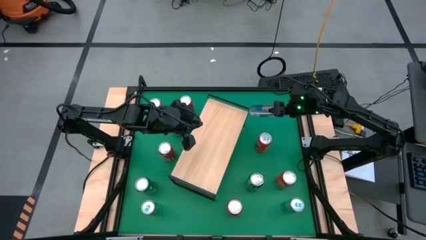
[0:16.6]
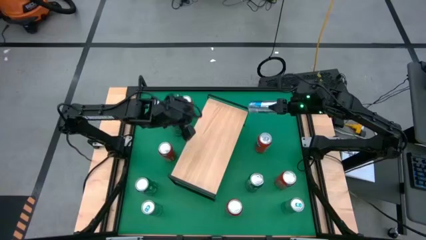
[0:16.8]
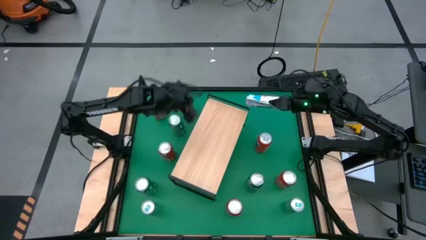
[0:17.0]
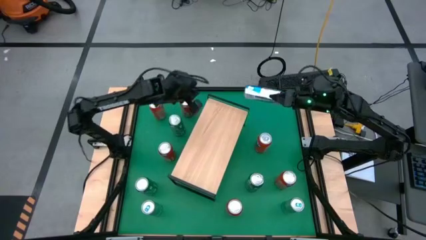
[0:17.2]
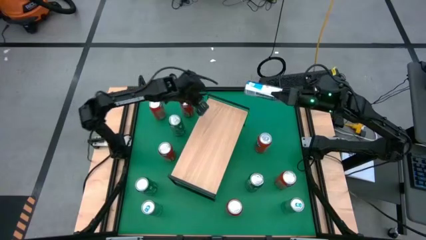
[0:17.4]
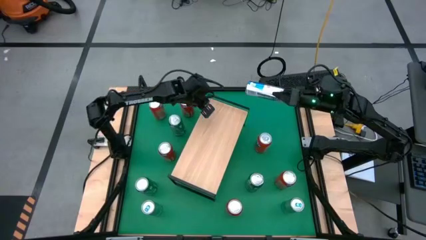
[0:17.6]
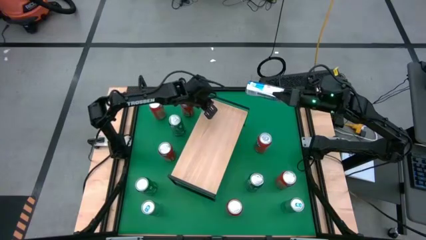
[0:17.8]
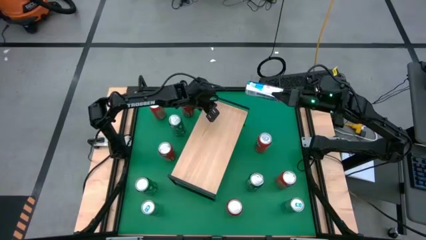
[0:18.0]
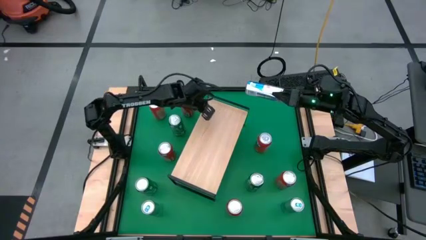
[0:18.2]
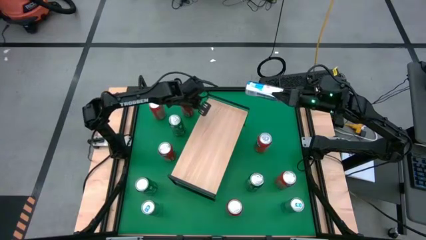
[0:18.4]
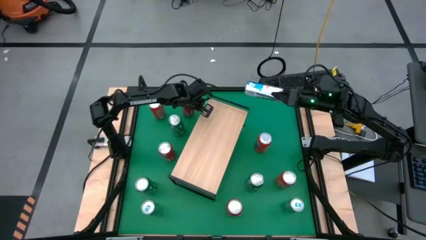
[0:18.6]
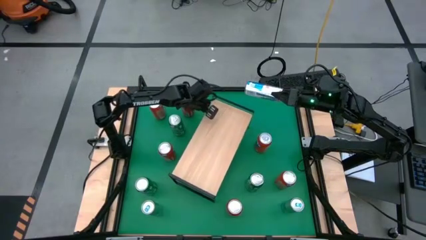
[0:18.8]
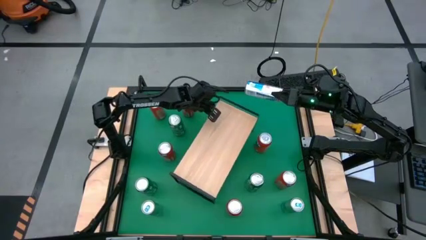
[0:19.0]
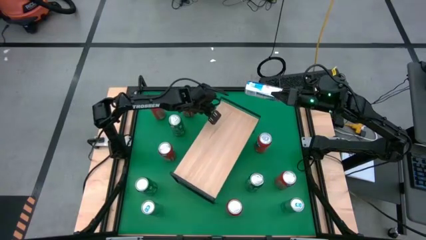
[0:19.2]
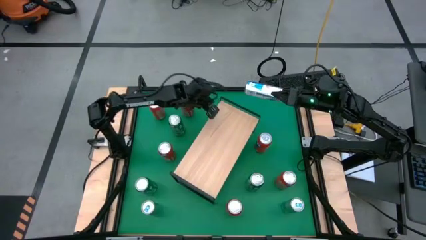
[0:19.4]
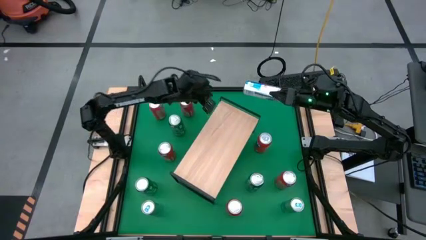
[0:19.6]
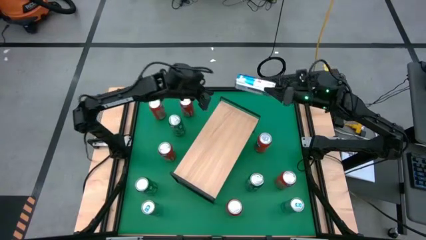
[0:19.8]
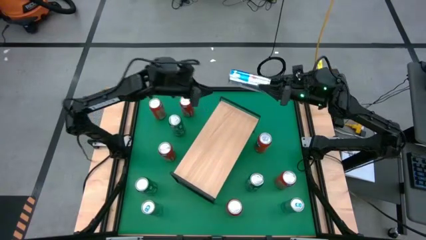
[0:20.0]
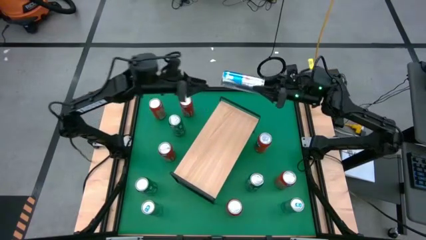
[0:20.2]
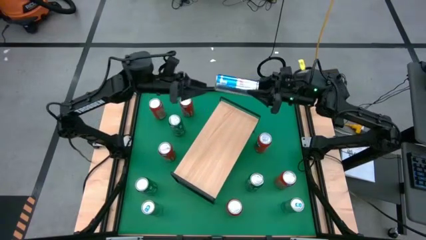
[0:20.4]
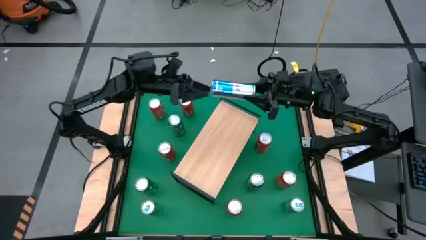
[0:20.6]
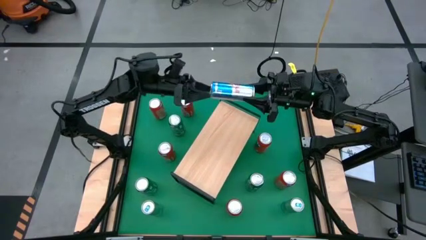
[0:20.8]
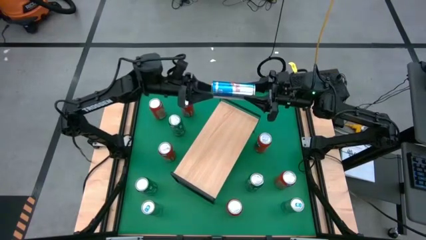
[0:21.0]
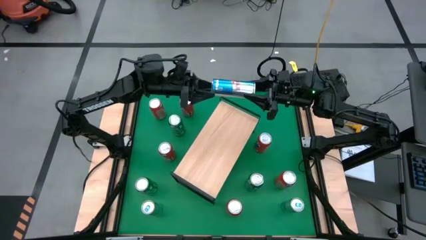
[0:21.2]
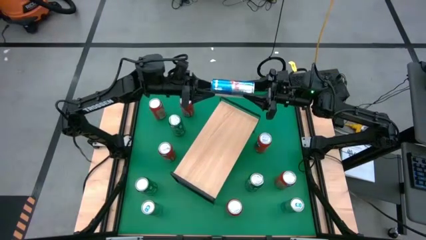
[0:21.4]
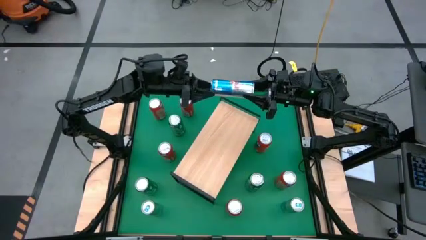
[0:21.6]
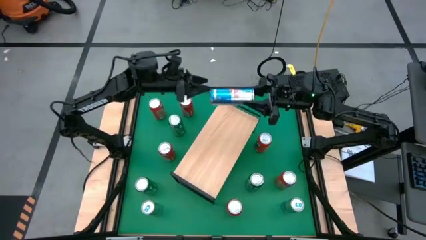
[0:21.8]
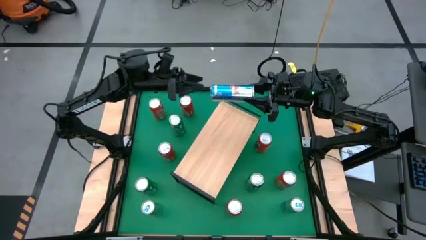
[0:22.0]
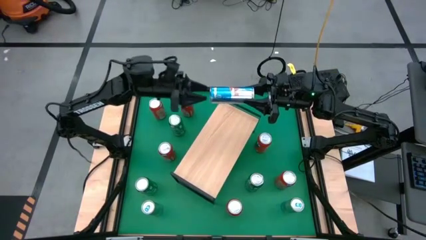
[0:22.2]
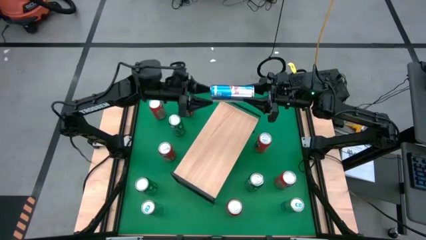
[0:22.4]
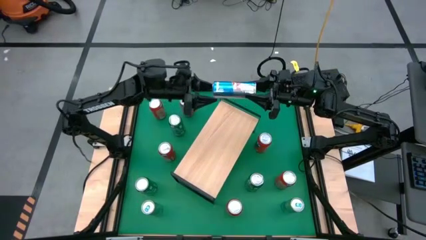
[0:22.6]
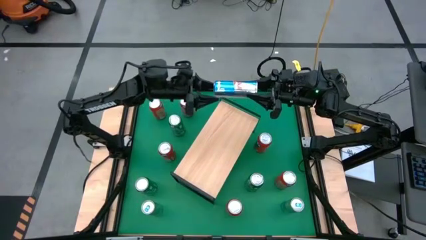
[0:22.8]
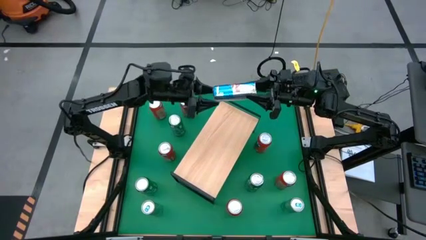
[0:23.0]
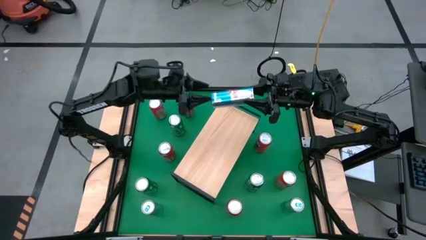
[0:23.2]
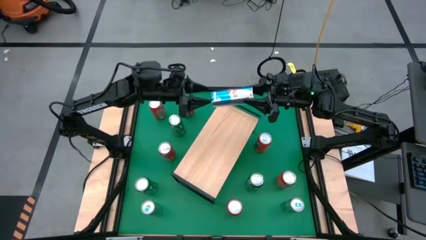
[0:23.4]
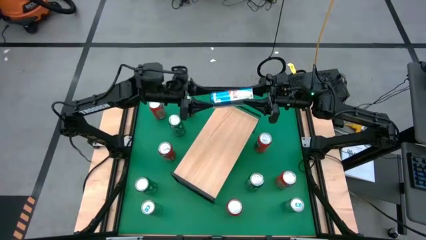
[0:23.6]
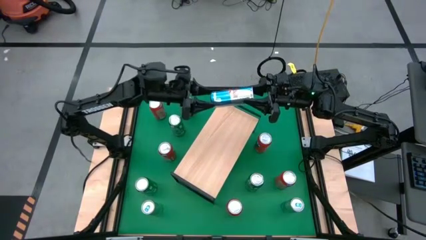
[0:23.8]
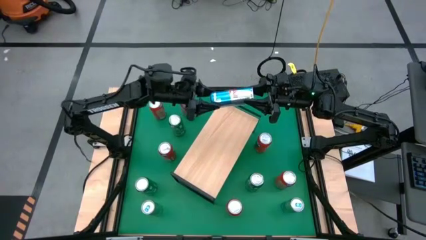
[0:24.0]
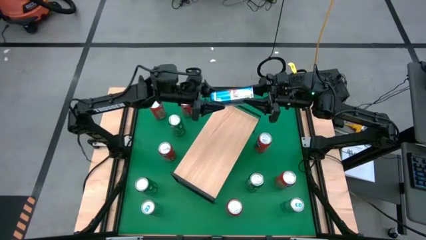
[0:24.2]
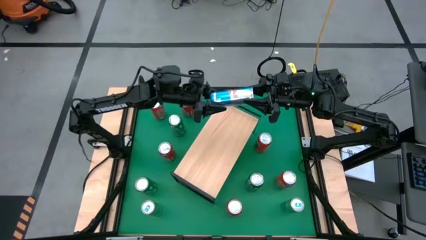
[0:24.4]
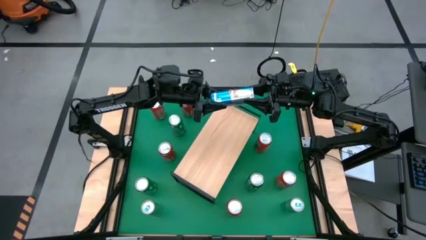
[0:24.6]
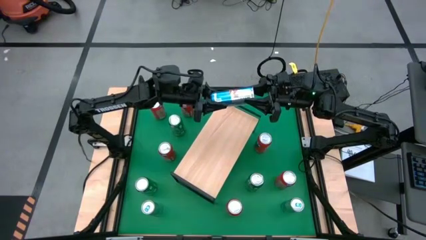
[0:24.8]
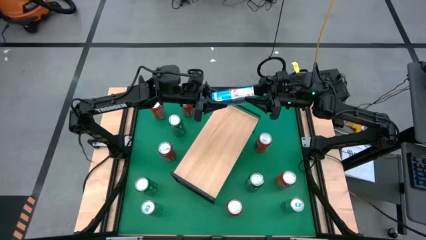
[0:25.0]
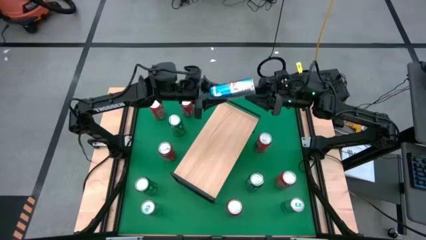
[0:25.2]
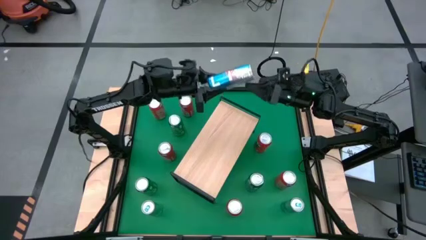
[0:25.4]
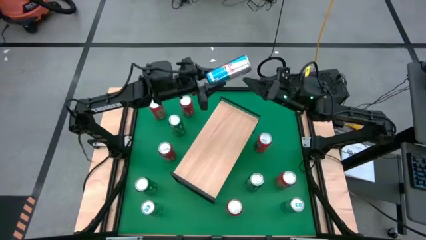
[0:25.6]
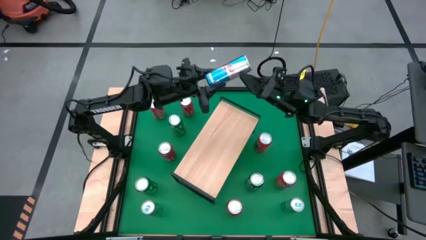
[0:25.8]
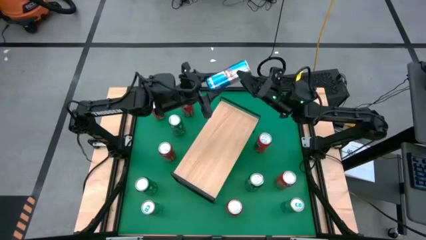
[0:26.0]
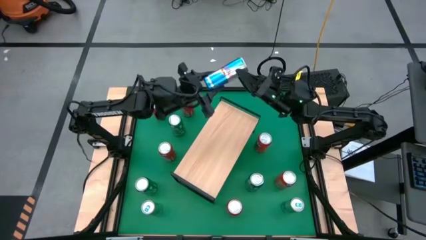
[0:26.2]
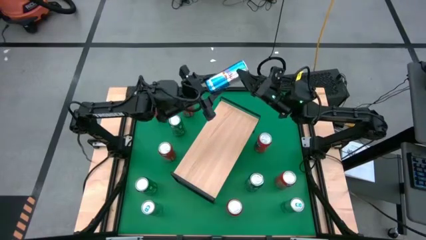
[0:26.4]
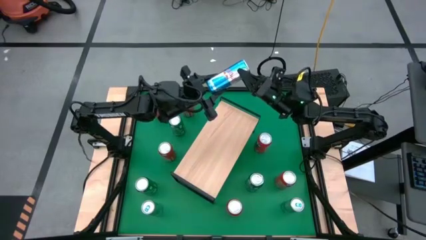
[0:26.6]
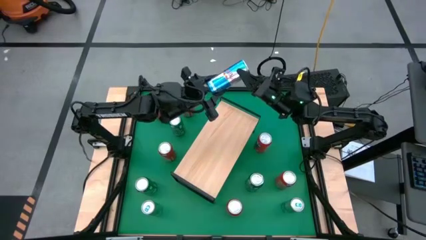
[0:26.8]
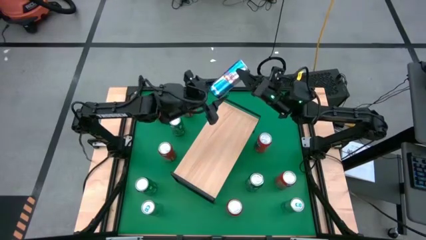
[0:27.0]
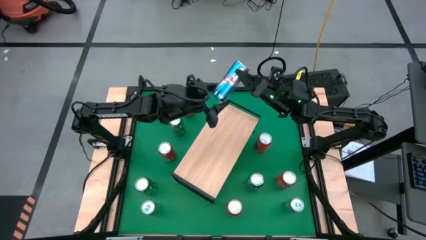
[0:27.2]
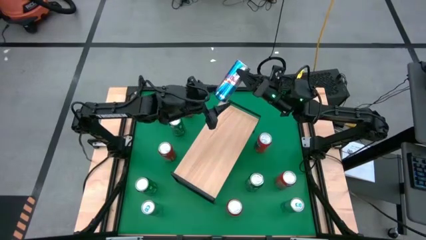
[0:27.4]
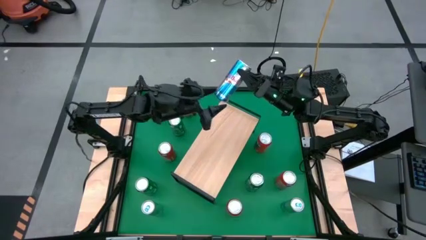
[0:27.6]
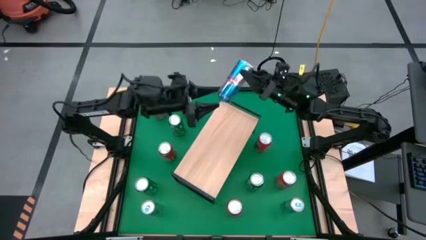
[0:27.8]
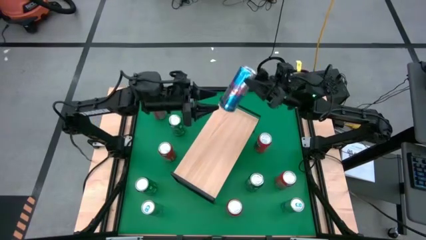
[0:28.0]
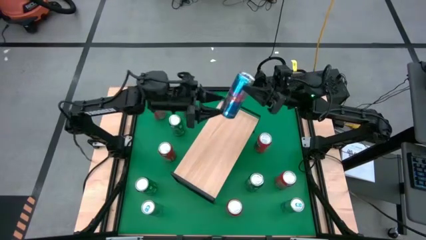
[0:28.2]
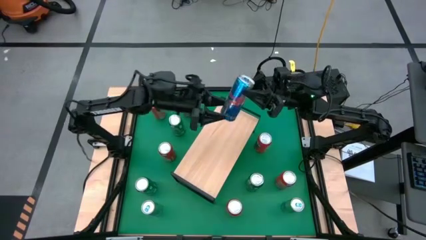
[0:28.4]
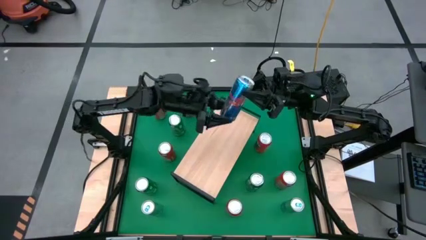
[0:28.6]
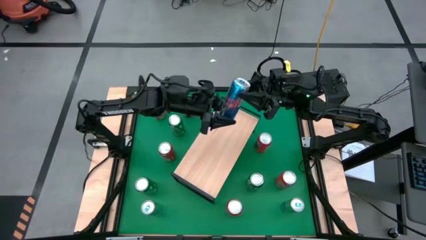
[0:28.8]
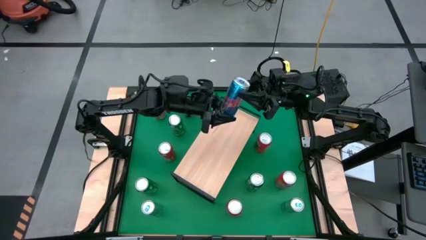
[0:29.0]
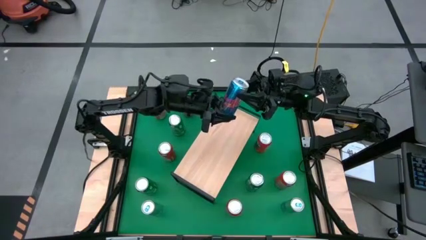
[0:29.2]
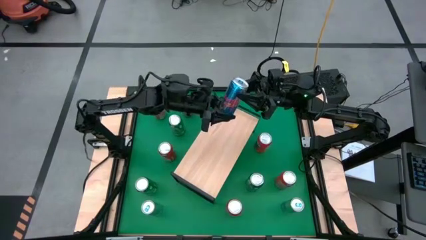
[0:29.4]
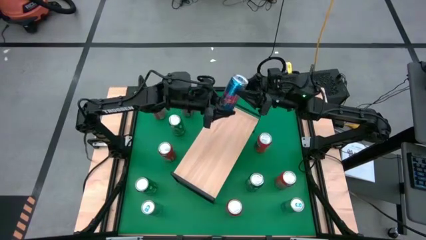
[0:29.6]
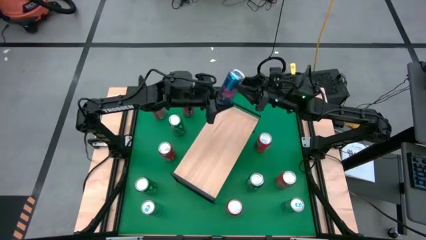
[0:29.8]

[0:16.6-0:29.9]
Task: Sort soda cans
Put the blue soda can on the shelf

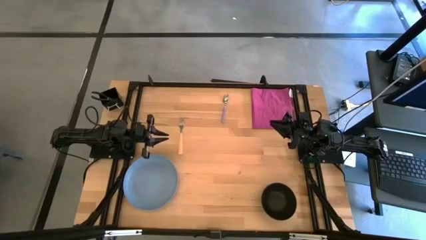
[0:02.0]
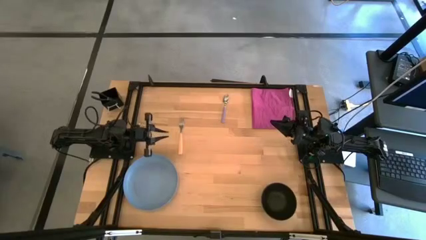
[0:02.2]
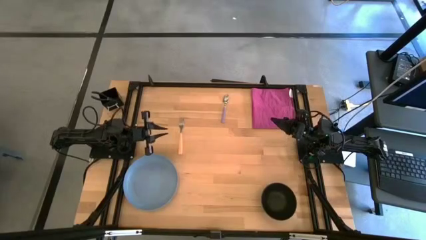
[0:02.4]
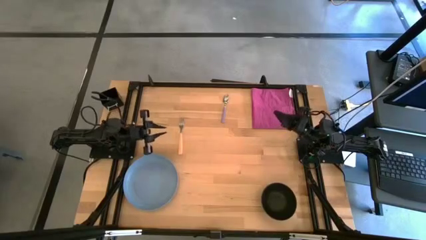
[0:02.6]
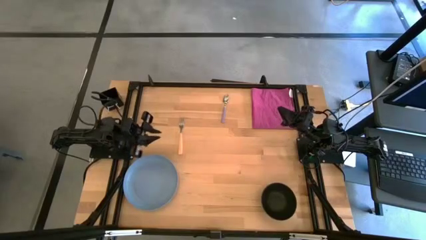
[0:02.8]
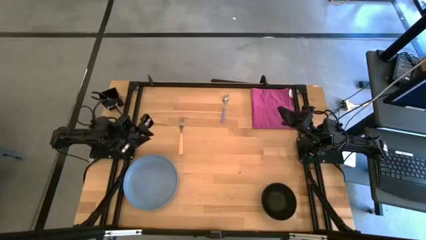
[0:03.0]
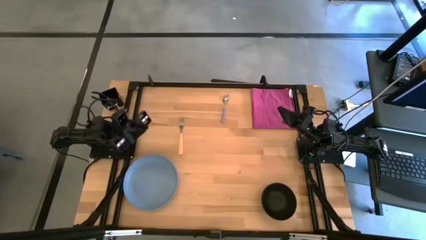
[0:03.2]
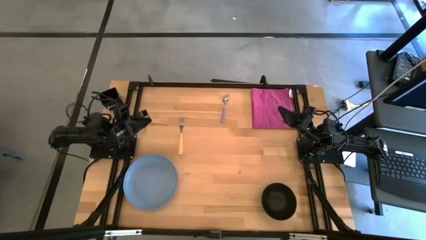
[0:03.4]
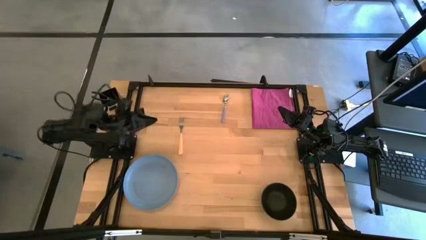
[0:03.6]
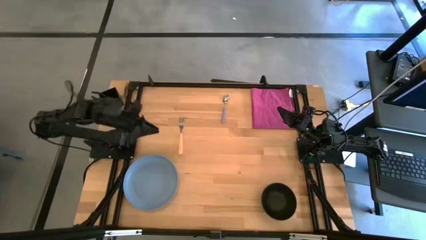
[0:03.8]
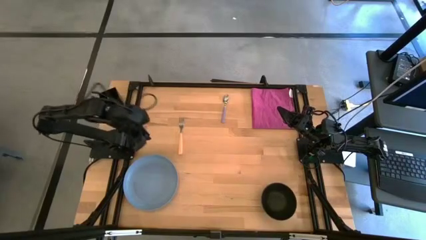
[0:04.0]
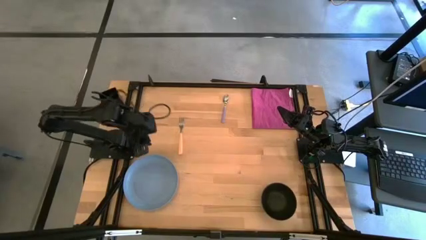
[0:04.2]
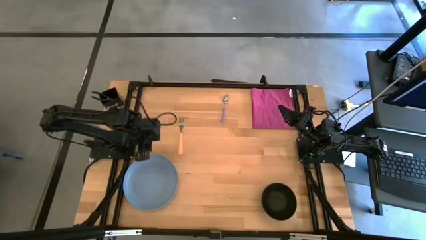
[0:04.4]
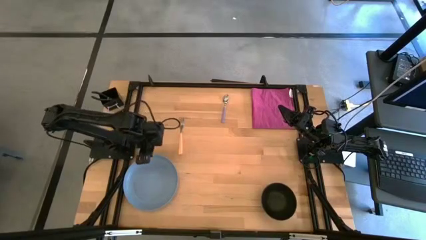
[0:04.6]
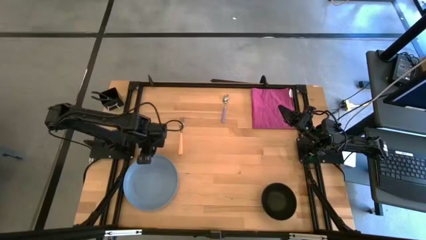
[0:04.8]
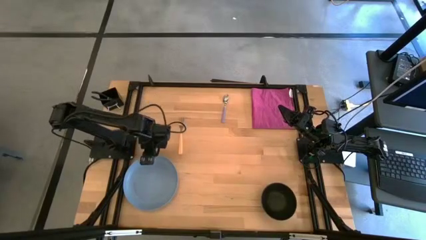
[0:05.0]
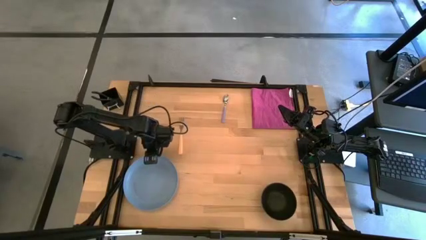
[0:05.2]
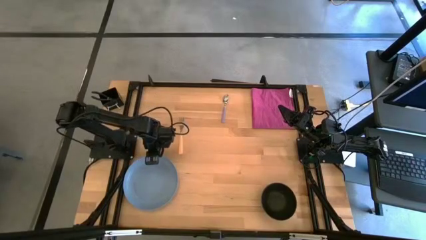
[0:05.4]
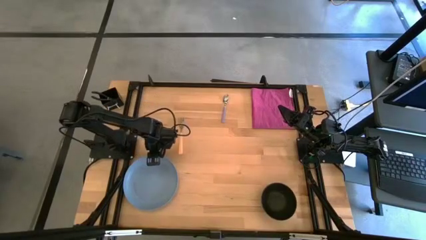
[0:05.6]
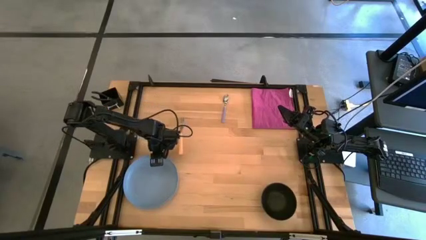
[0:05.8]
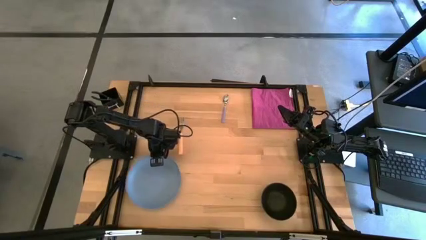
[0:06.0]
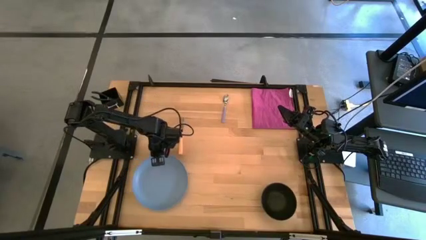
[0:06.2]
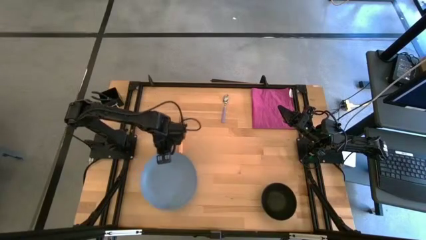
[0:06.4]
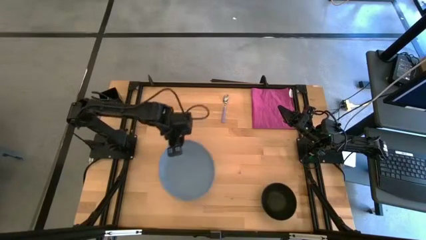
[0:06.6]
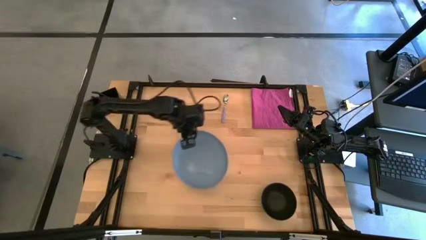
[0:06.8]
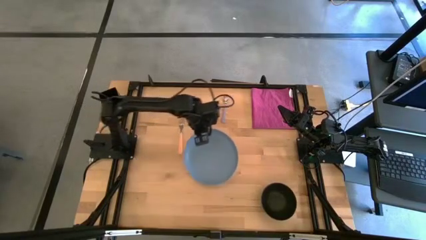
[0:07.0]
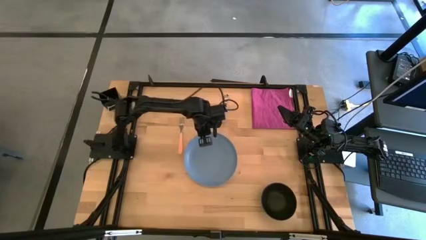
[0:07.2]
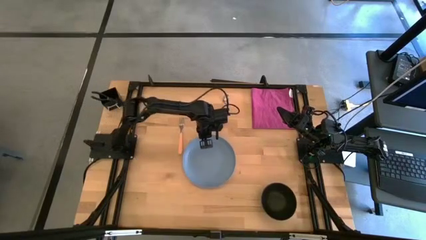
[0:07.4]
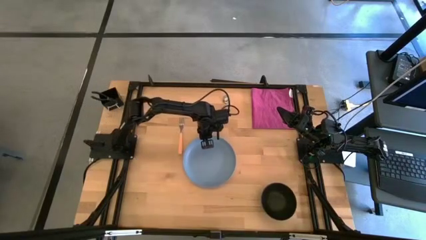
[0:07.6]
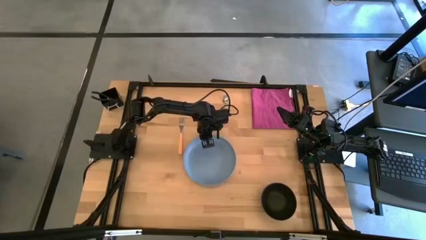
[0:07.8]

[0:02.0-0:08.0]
Task: Set table place
Move the blue plate to the center of the table
